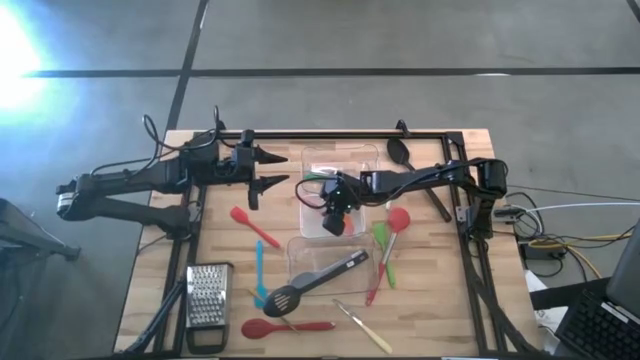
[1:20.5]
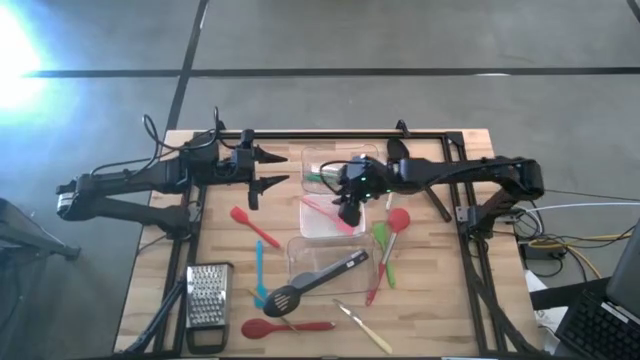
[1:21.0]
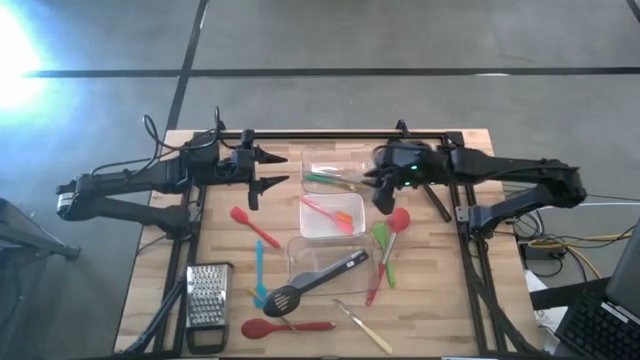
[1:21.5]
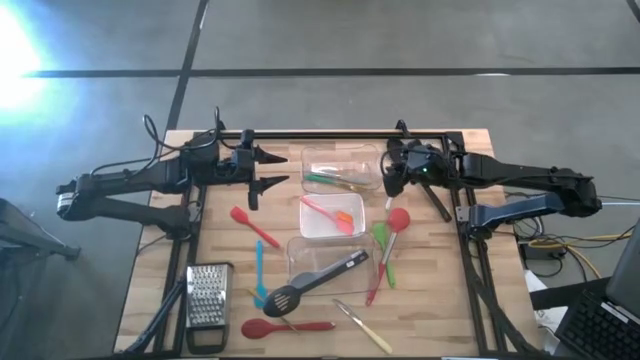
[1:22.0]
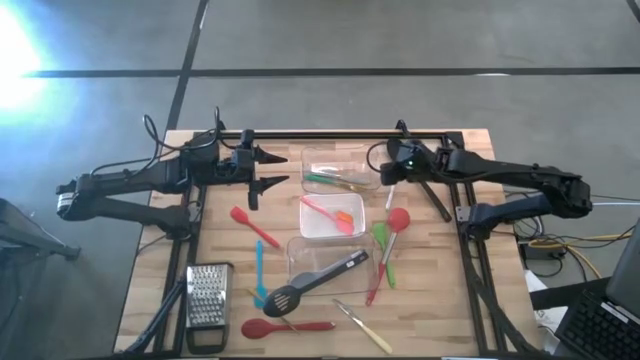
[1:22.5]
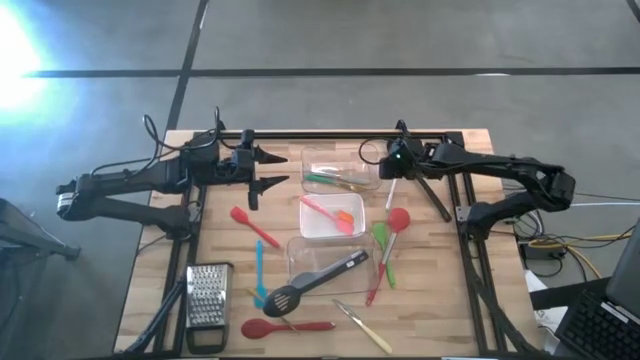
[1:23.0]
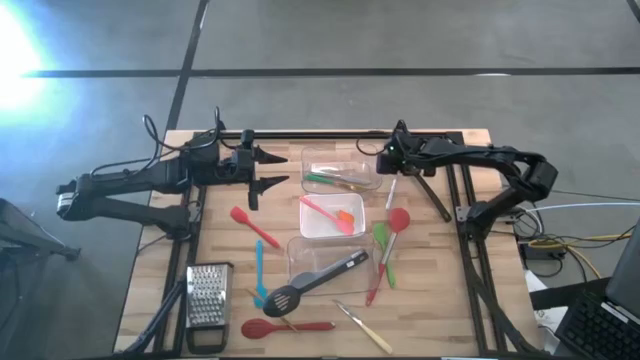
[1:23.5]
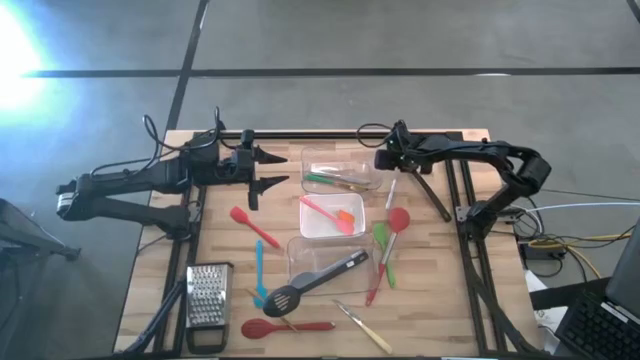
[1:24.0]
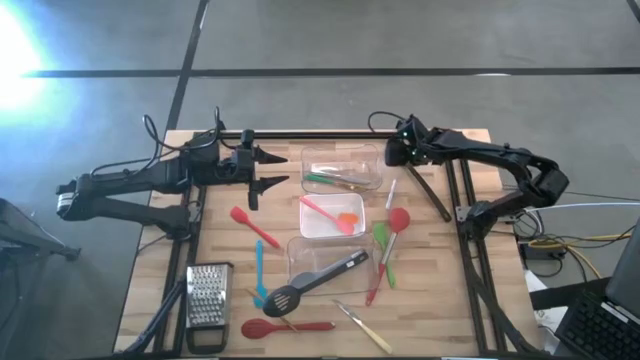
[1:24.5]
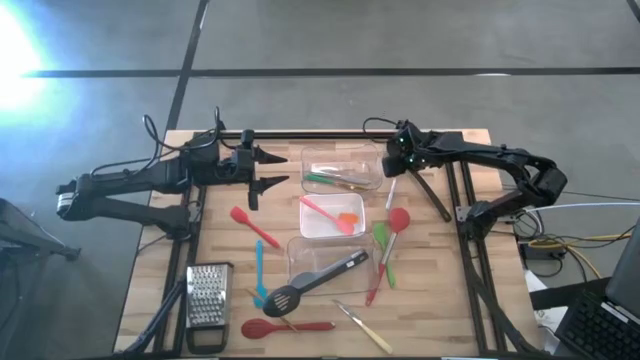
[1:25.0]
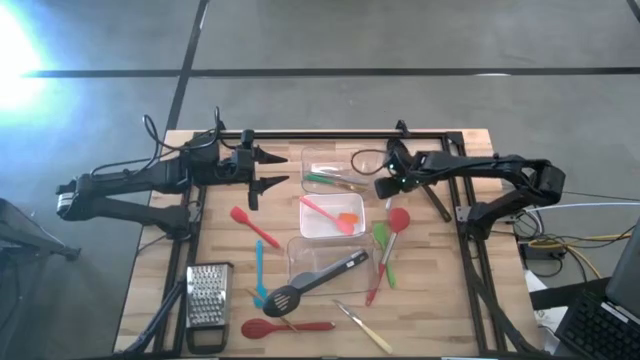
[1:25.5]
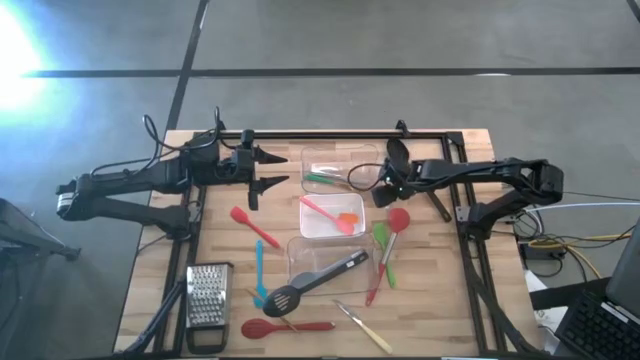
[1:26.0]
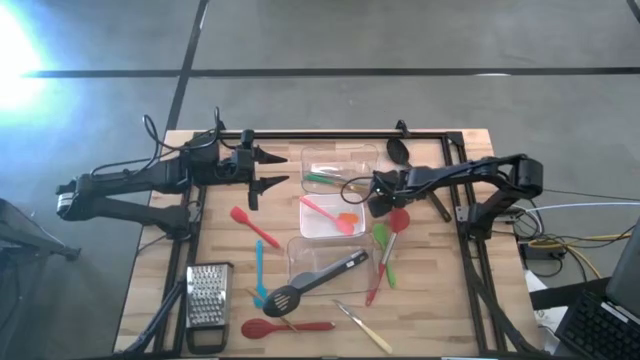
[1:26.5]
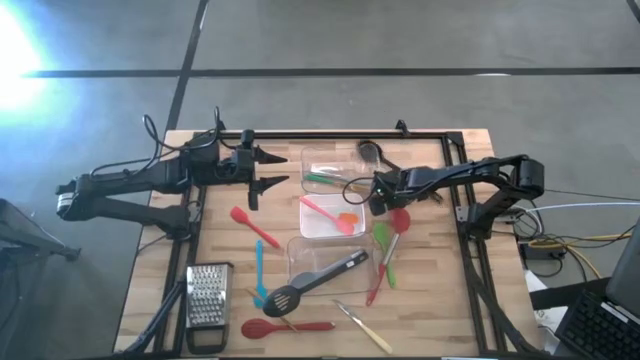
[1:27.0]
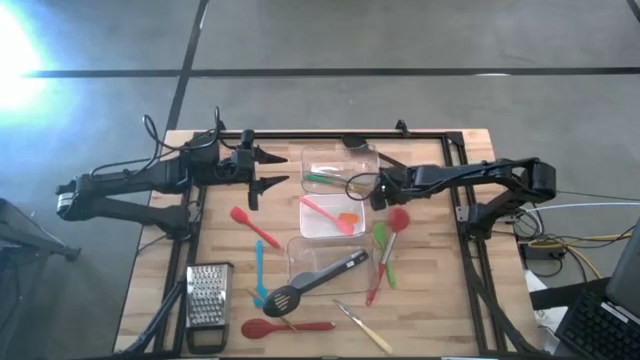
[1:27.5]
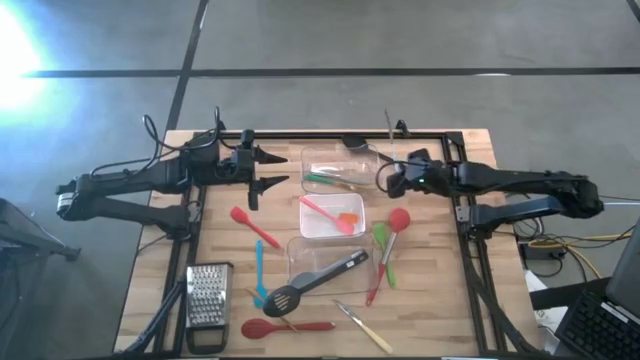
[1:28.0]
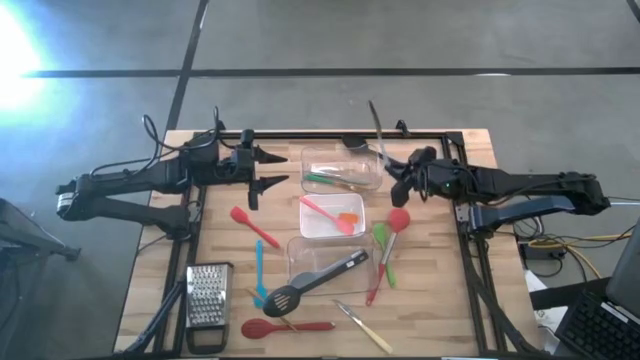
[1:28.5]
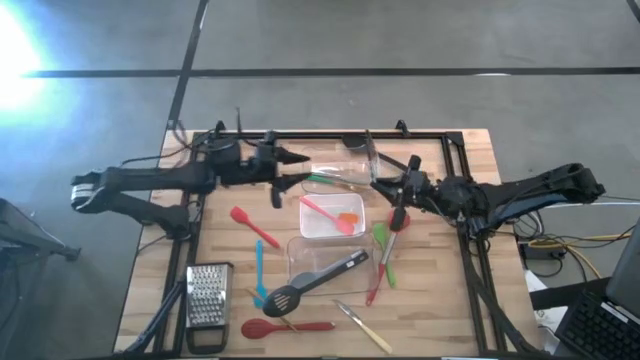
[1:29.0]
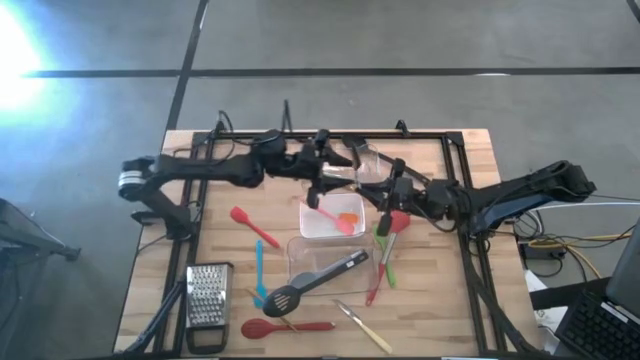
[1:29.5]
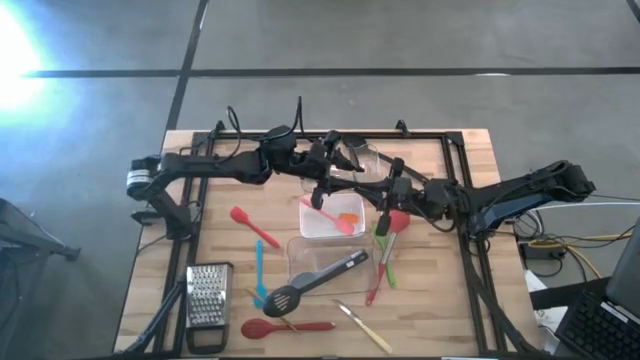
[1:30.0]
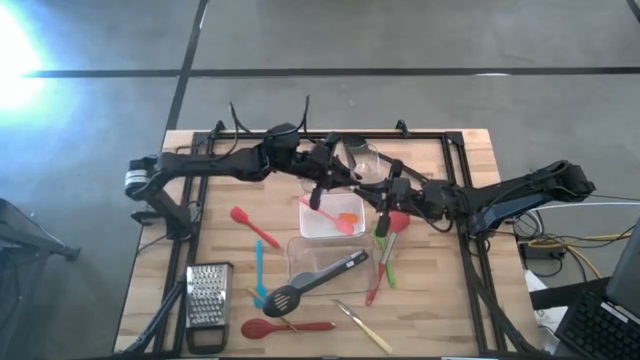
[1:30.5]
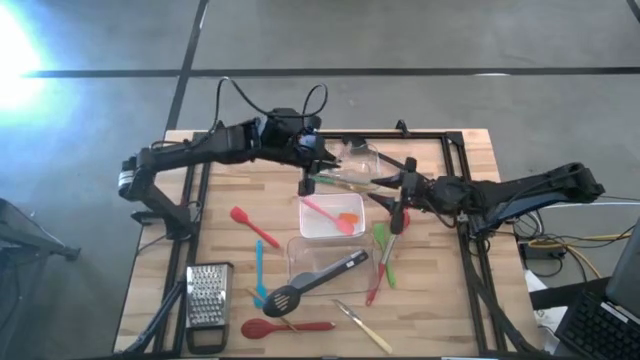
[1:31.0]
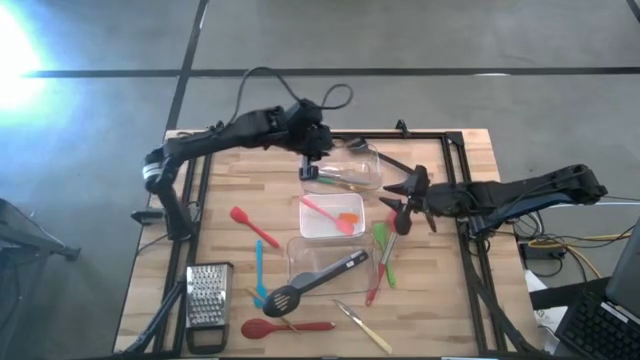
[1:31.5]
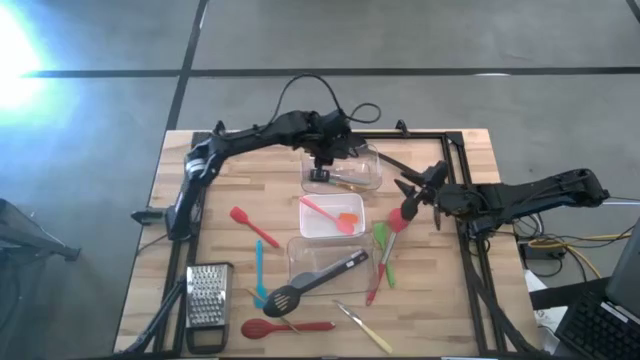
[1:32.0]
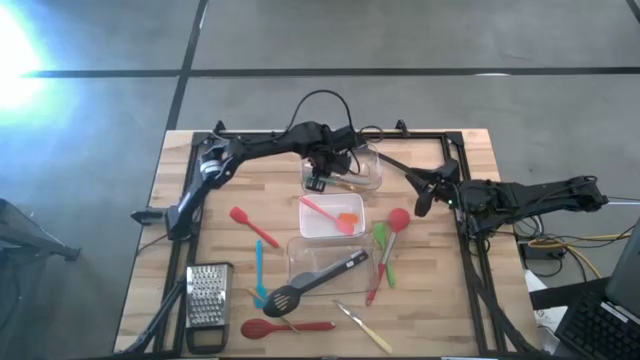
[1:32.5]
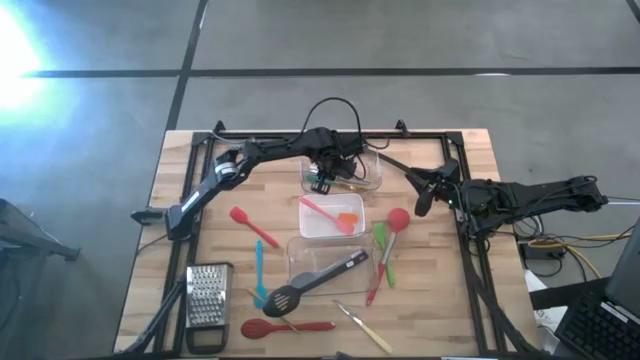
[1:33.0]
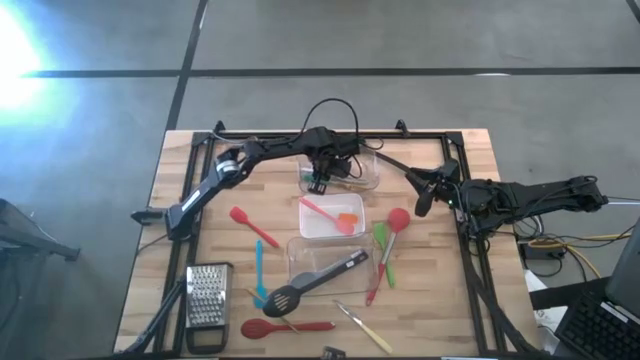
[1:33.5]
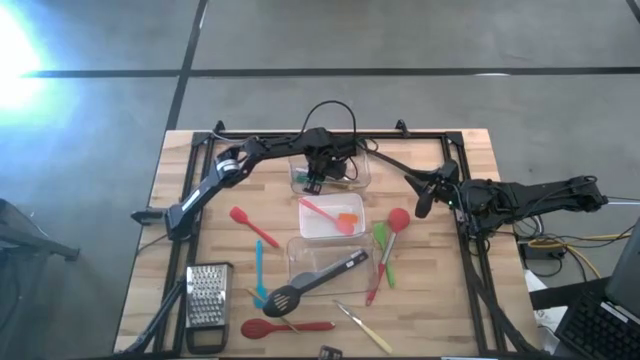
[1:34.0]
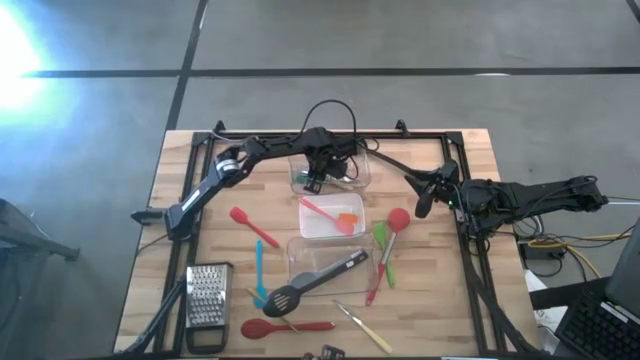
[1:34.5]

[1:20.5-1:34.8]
Task: Pick & Place Kitchen Items
Put the white knife into the top transparent bin

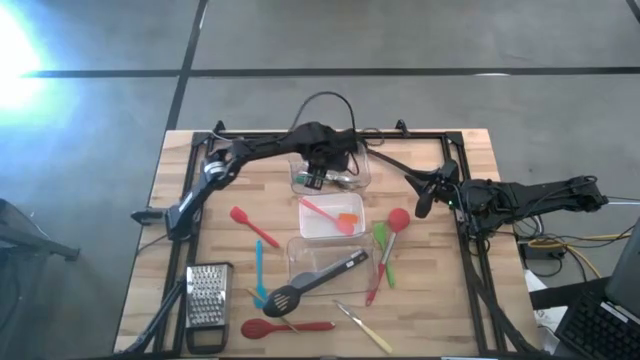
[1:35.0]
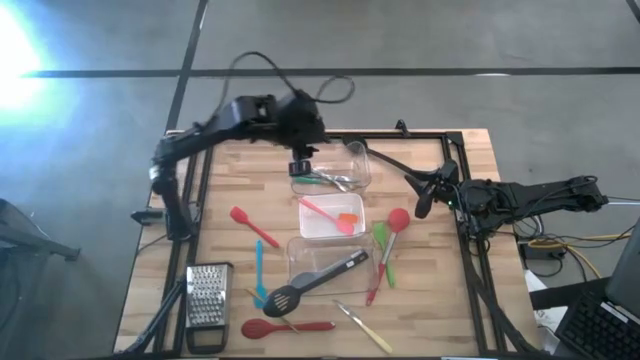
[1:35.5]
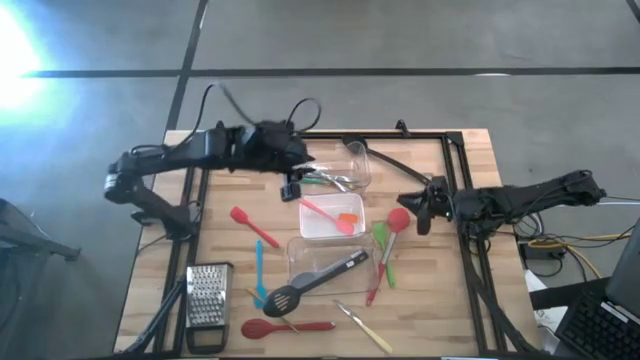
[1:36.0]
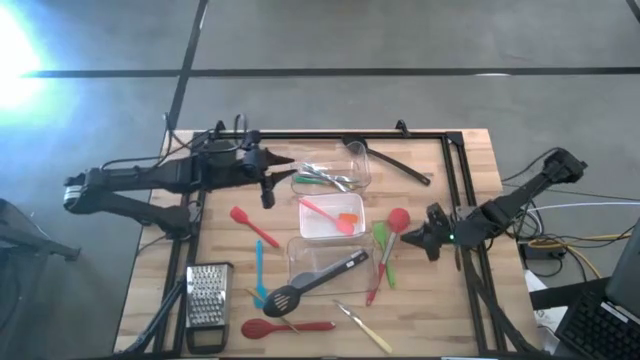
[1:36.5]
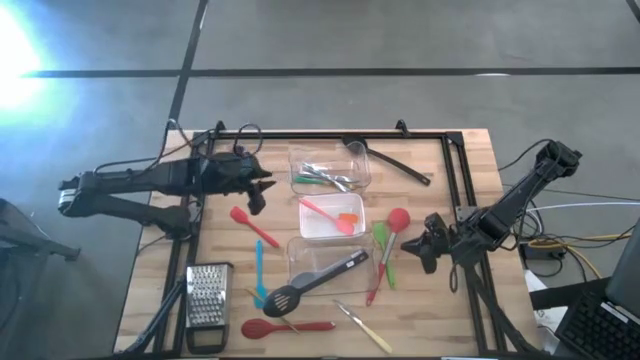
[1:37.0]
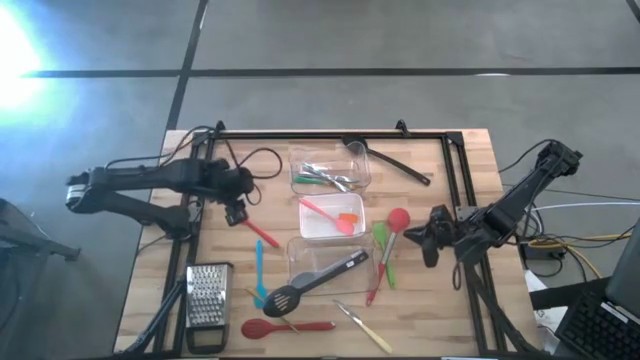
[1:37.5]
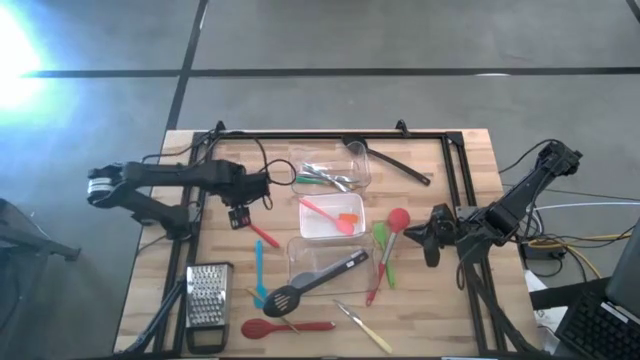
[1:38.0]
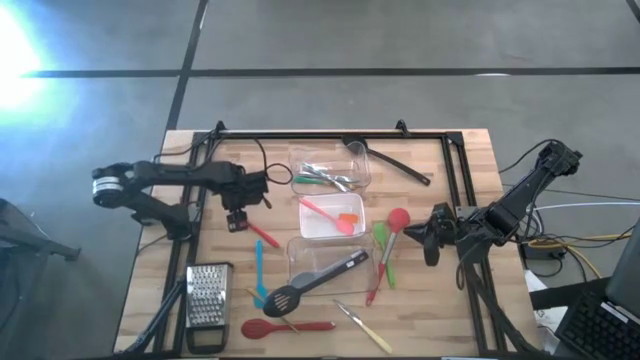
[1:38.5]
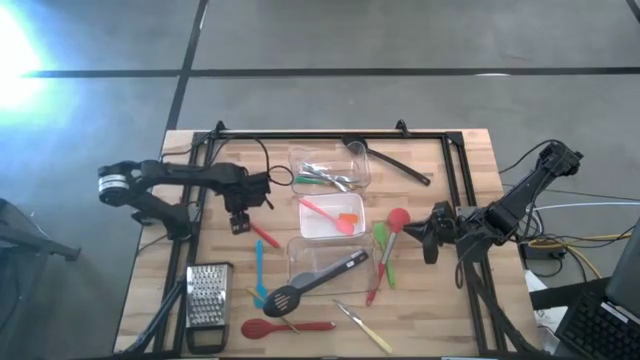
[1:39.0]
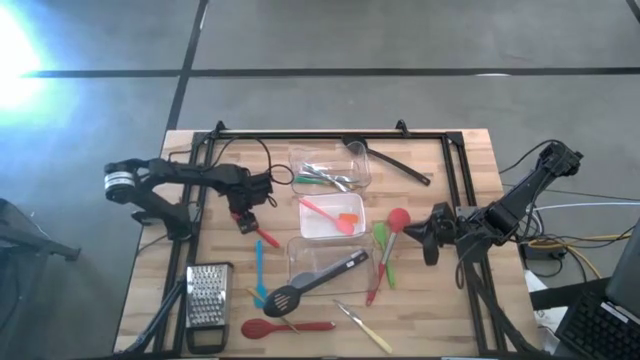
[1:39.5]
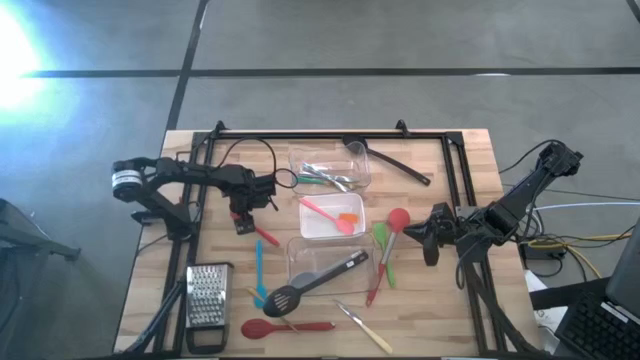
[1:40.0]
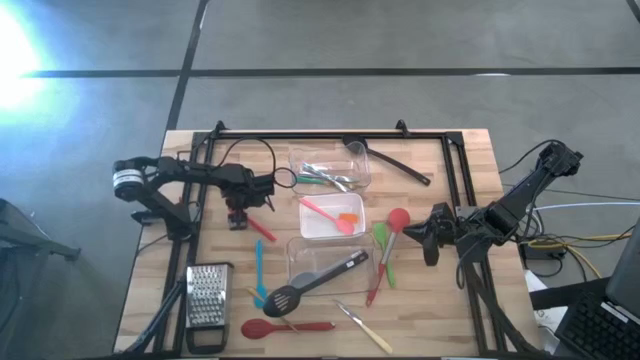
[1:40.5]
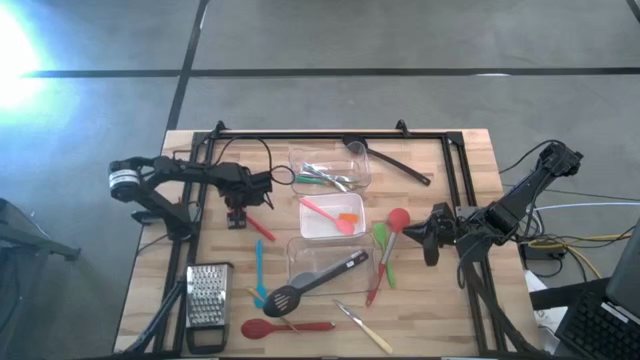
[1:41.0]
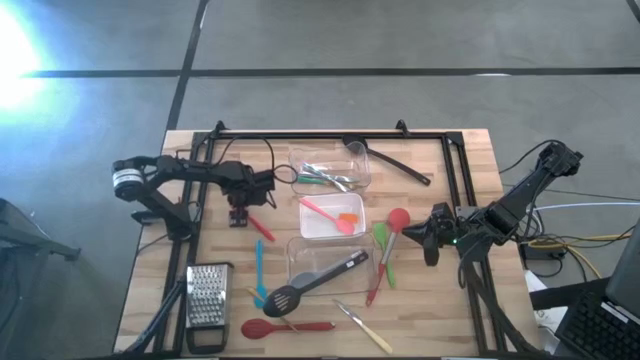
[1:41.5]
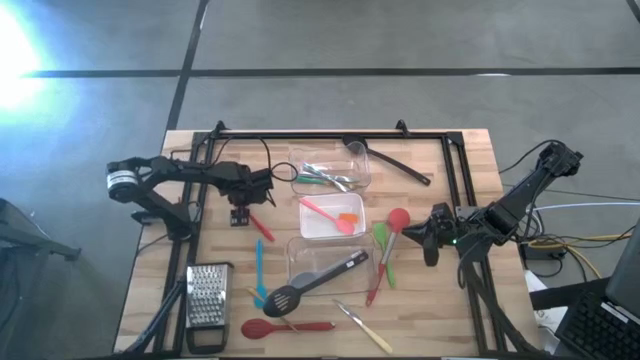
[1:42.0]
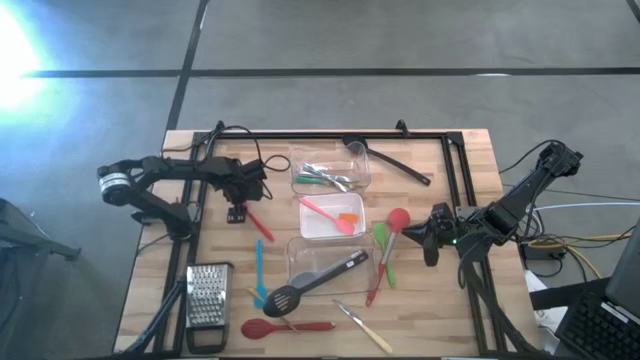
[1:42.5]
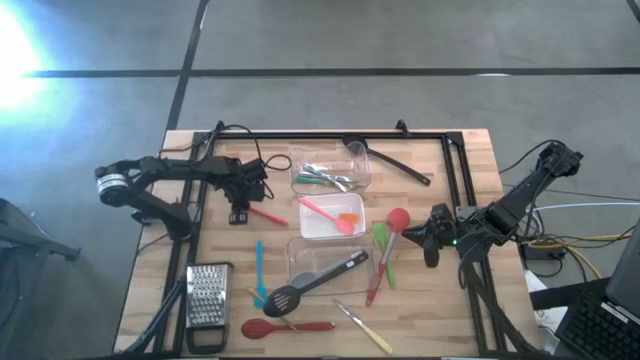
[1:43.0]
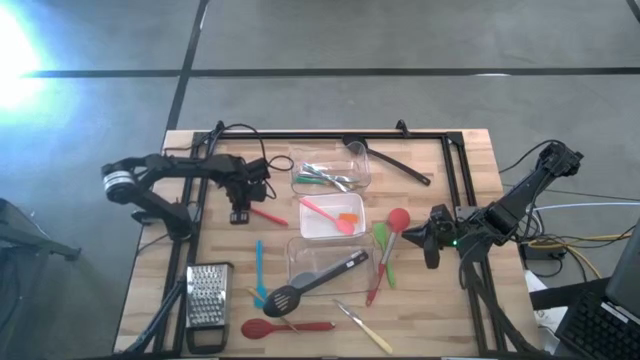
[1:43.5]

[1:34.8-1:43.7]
Put the red spatula into the white bin
